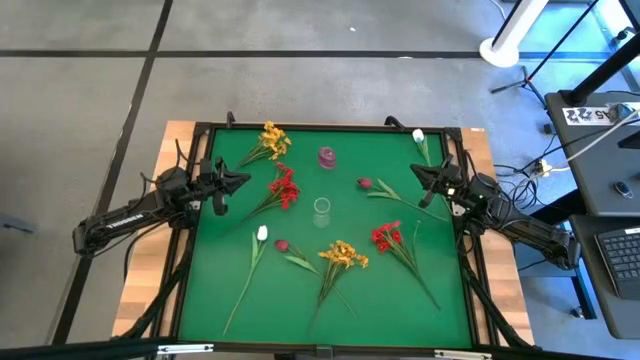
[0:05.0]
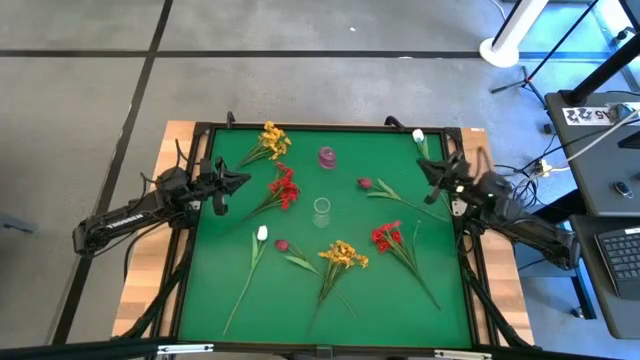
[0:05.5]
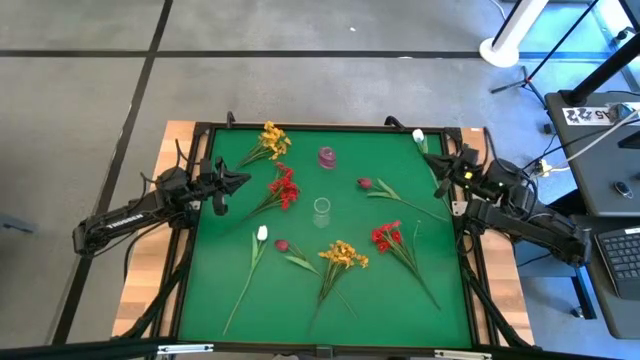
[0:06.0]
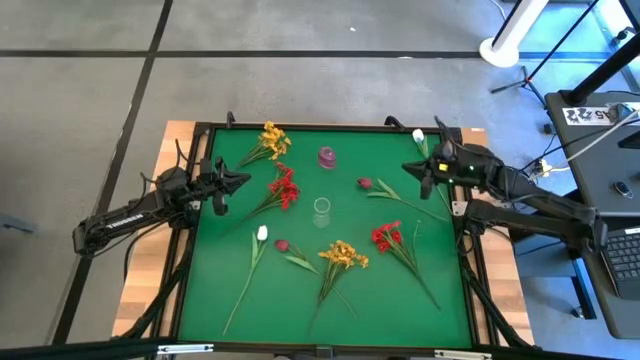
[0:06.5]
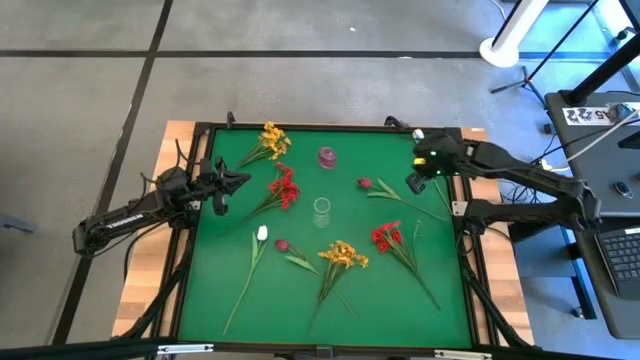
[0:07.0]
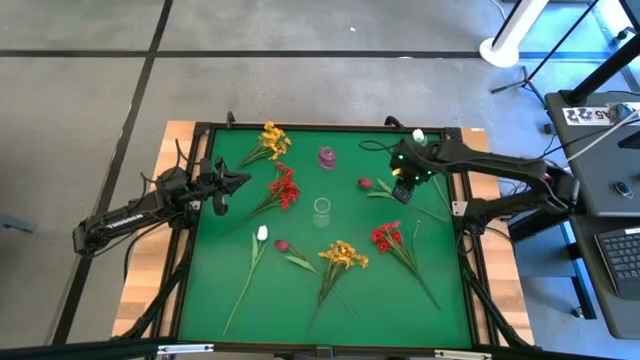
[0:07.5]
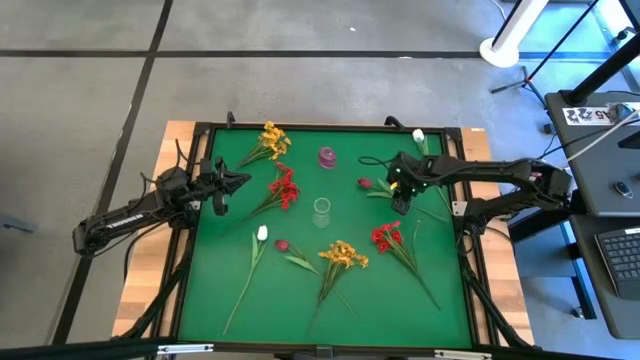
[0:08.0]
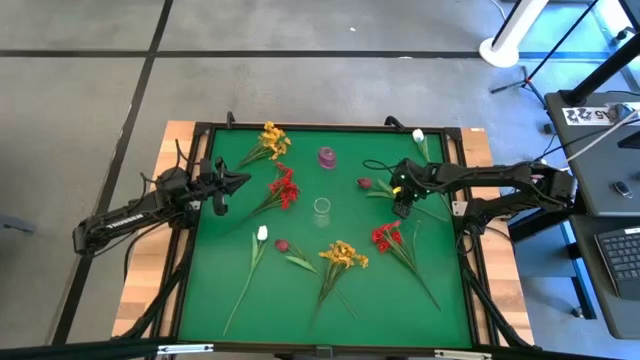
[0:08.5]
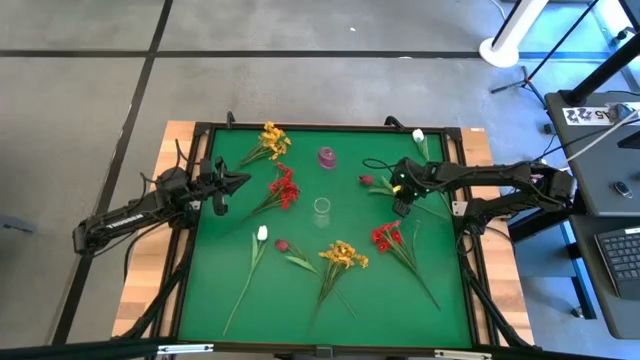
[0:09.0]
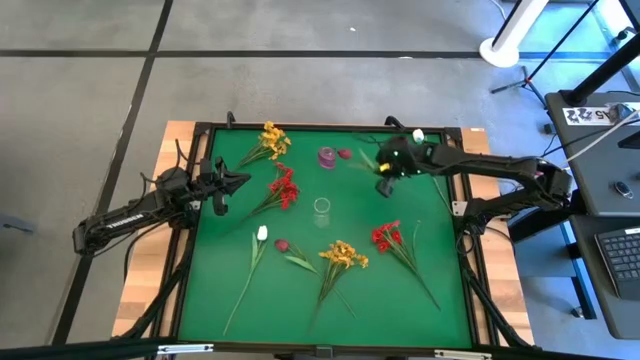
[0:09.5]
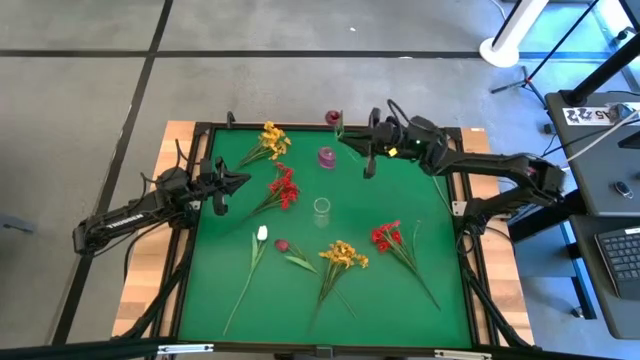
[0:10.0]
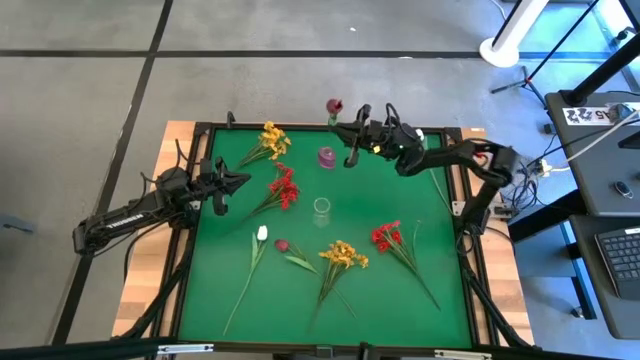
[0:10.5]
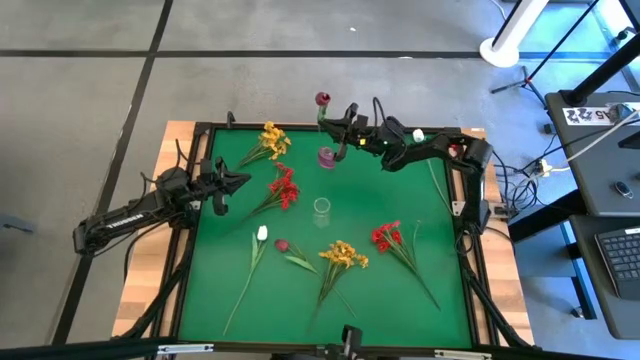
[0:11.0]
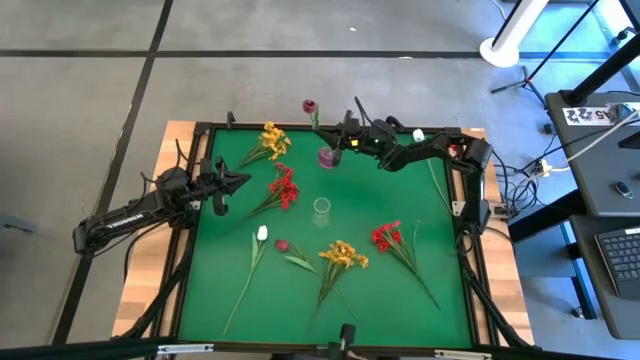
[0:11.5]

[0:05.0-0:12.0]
Task: Sort flowers into vase by color
Put the top red tulip into the purple vase

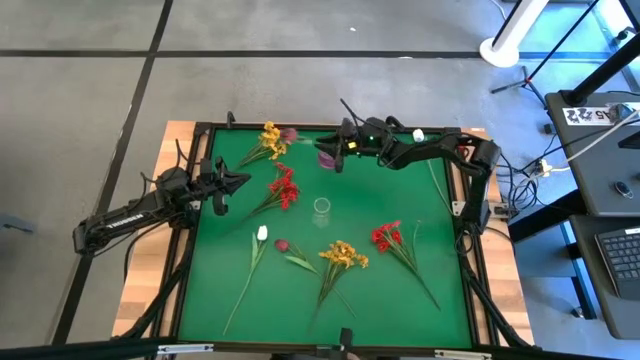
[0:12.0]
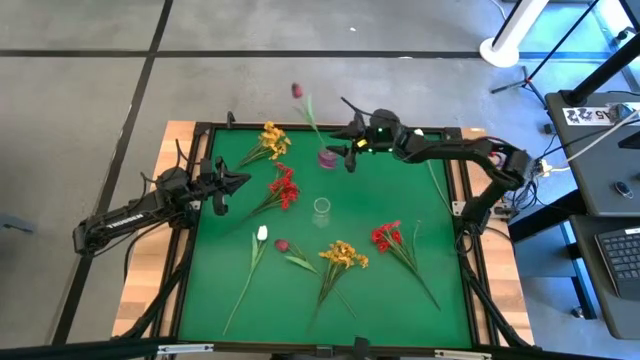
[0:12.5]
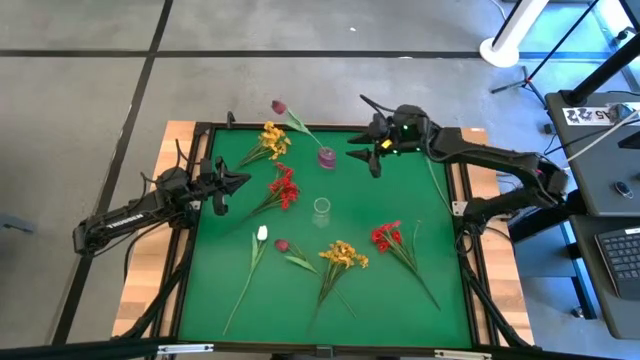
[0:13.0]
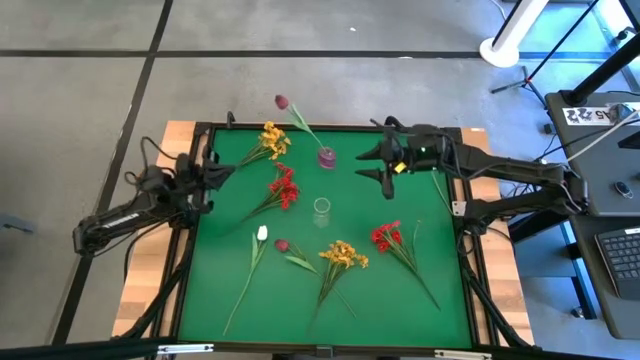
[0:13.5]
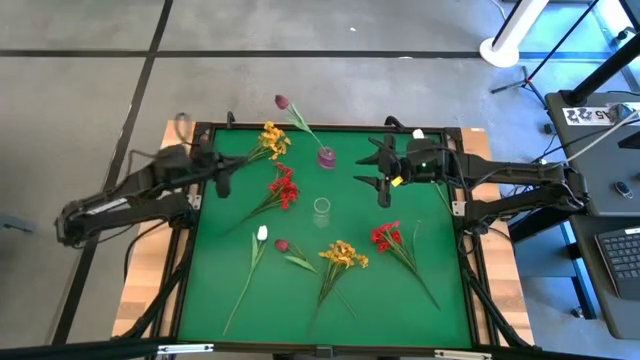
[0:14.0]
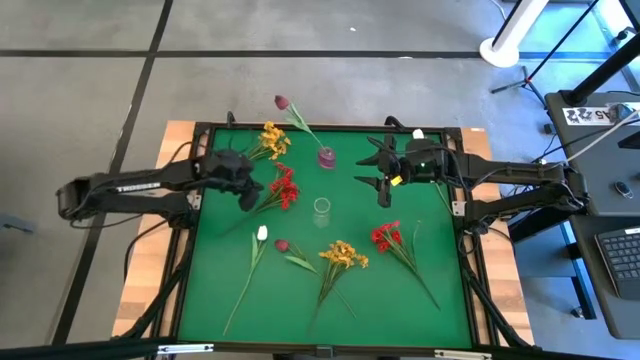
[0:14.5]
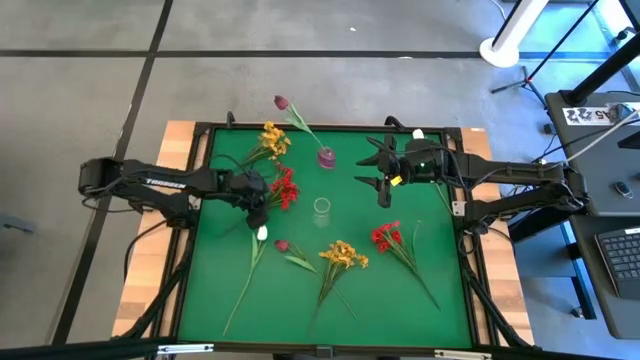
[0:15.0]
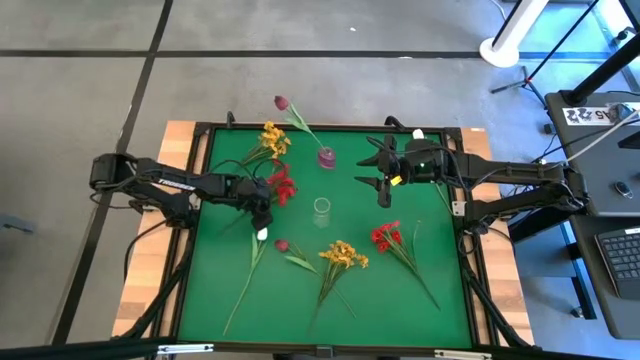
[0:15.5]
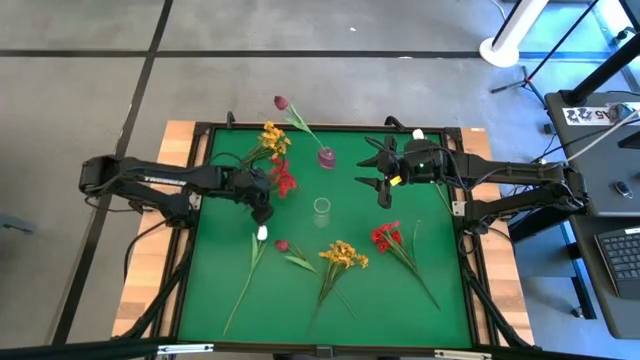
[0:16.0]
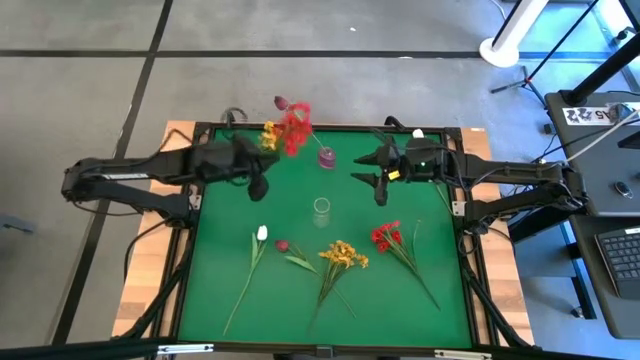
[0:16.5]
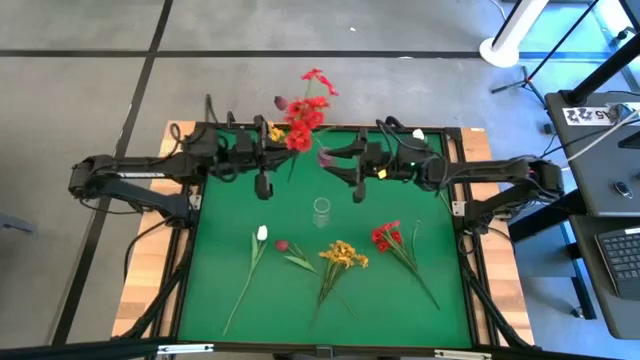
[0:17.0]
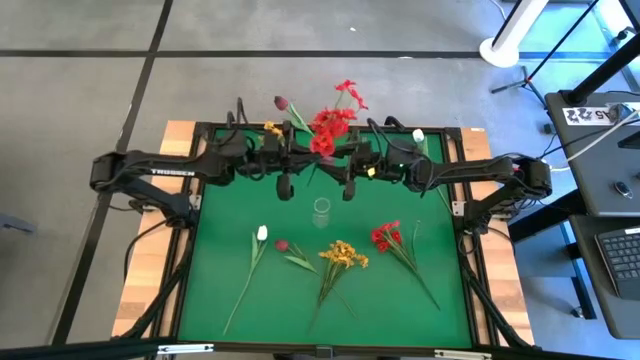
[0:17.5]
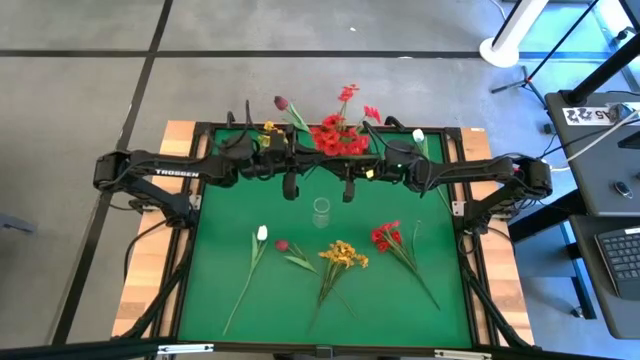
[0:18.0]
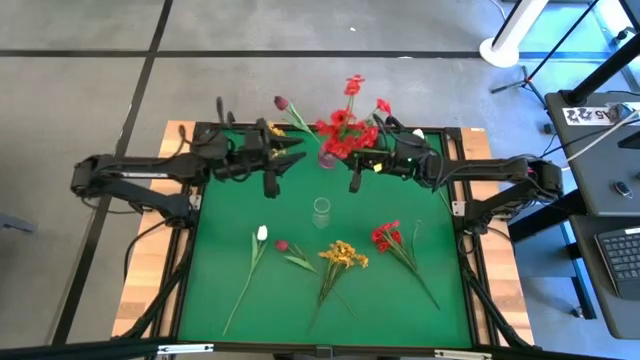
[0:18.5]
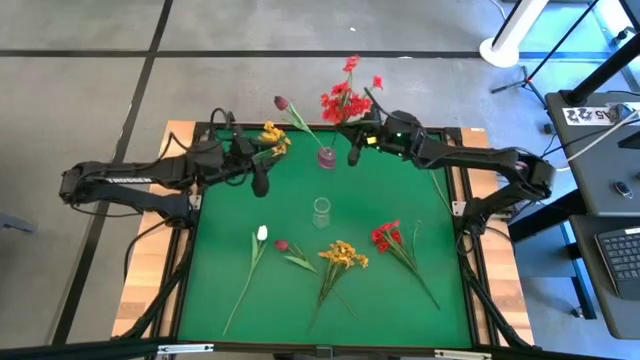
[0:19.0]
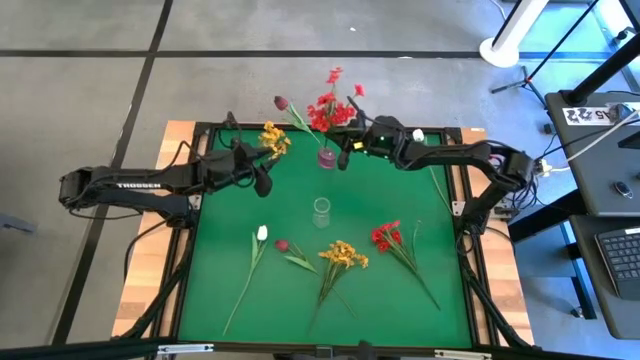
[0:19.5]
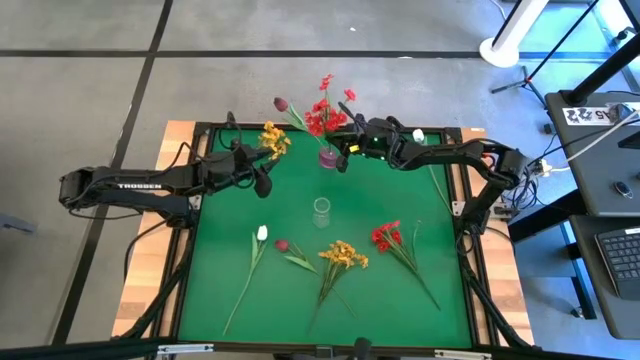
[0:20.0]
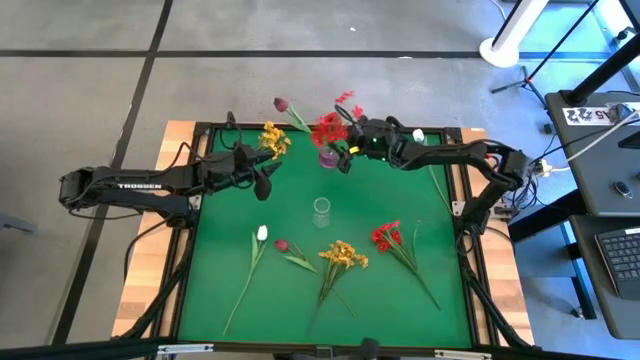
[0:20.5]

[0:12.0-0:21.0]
Put the left red flowers into the purple vase

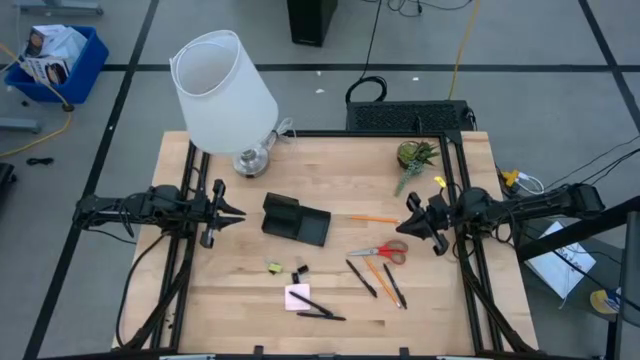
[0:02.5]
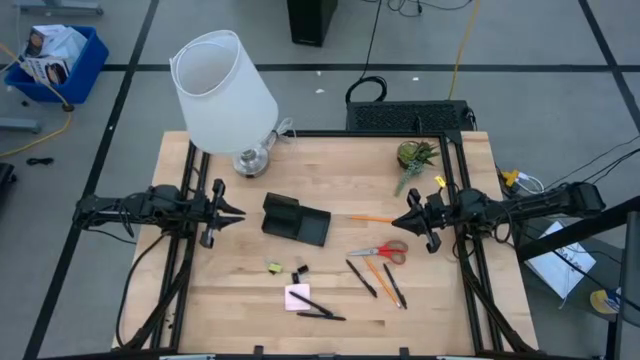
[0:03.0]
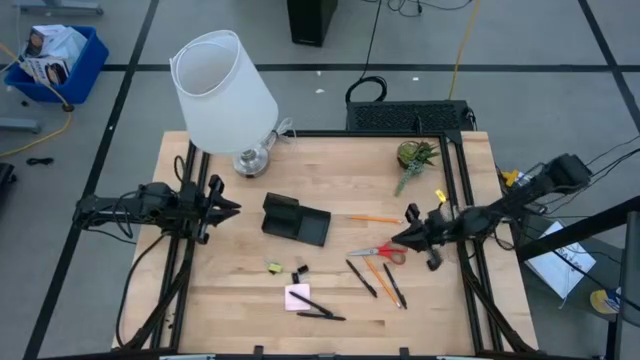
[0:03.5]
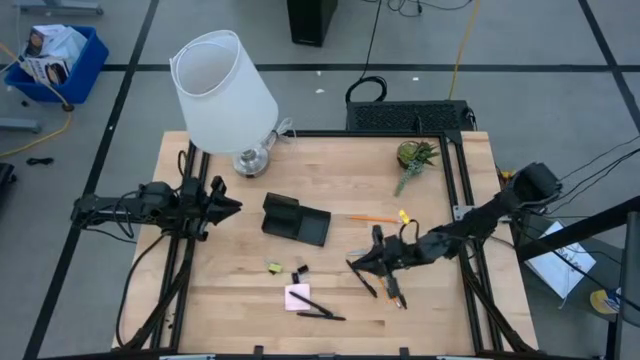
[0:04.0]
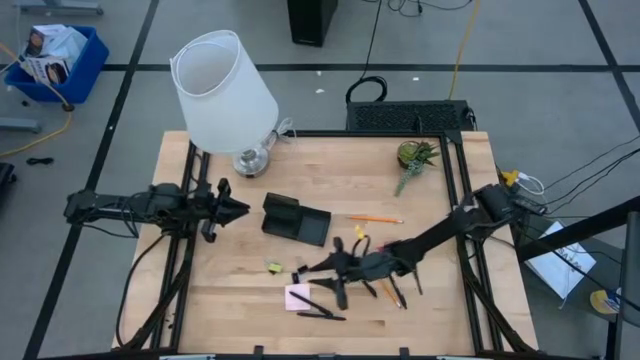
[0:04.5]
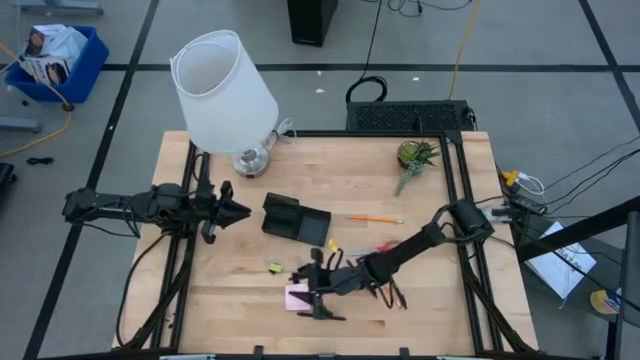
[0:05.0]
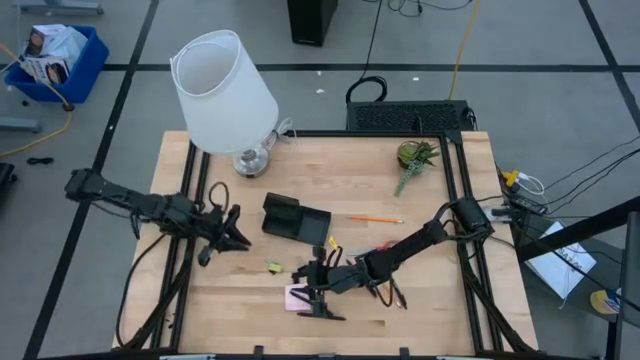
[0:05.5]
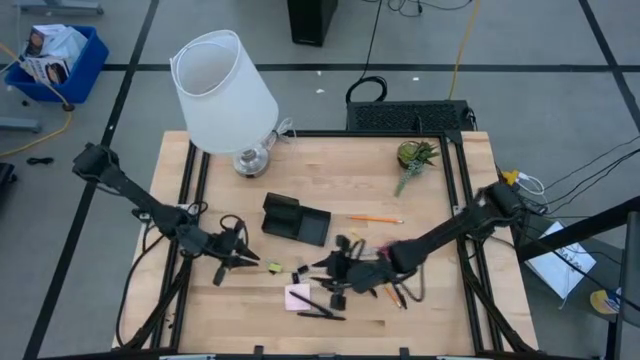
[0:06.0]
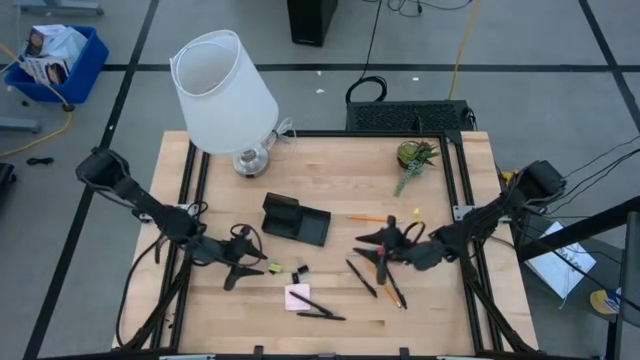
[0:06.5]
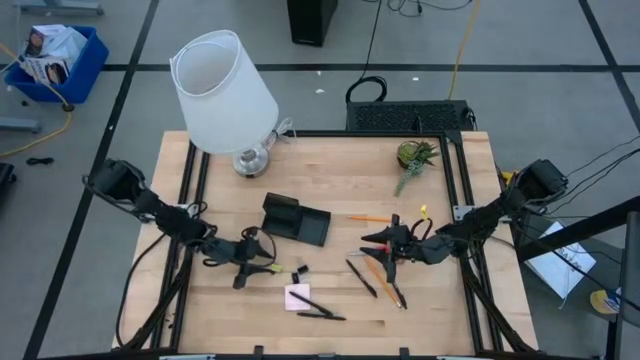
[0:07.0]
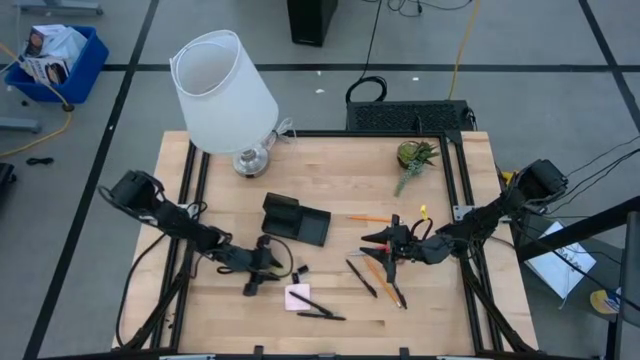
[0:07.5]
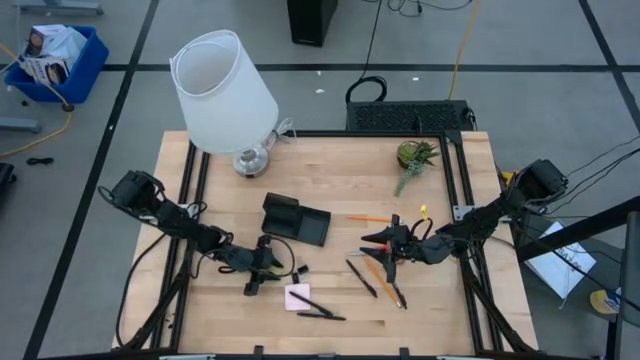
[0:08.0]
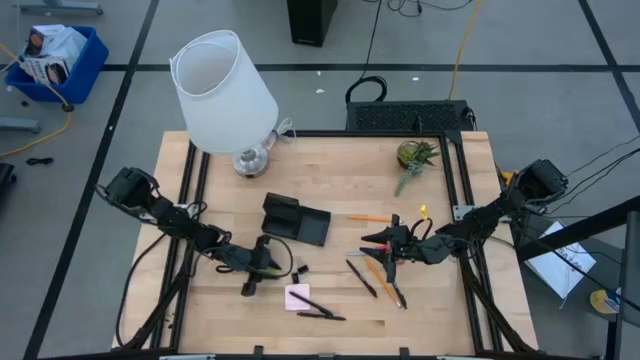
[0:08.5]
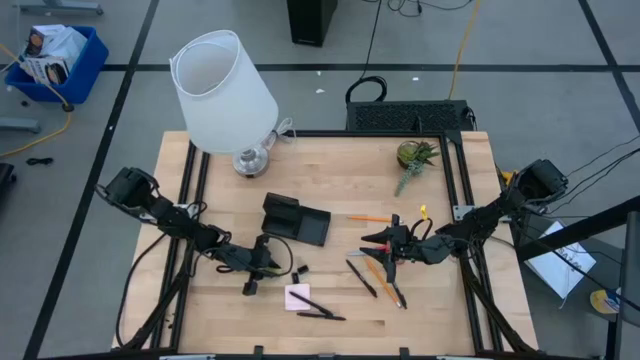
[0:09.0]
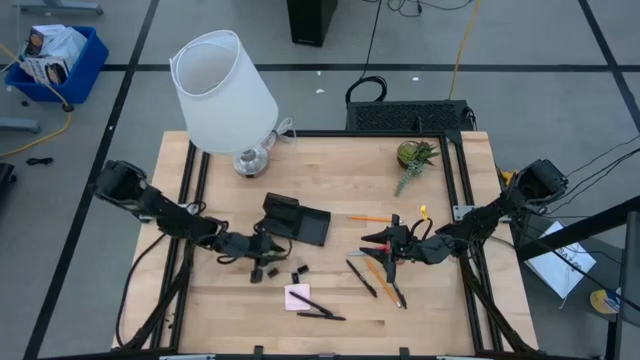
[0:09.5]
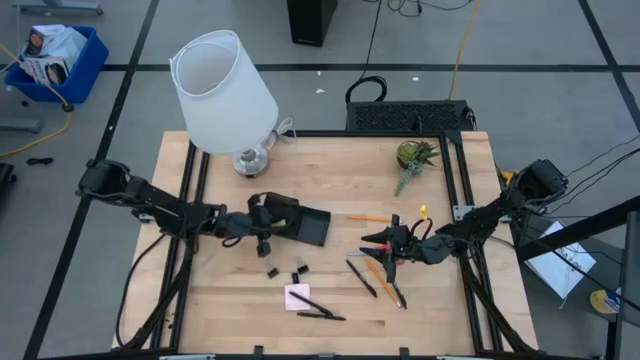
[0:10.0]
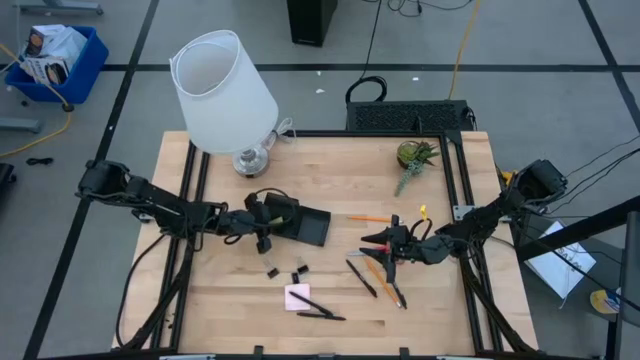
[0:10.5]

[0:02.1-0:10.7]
Task: Pick and place office supplies into organizer
Put the green eraser into the black desk organizer
